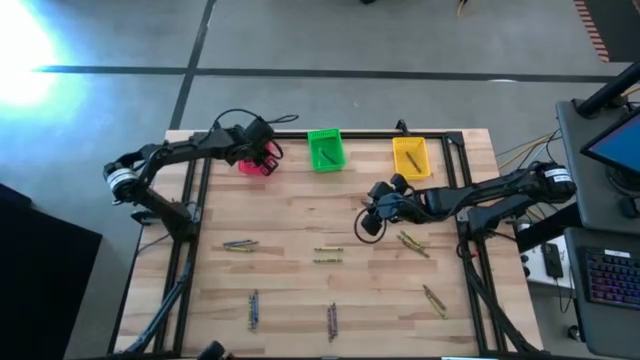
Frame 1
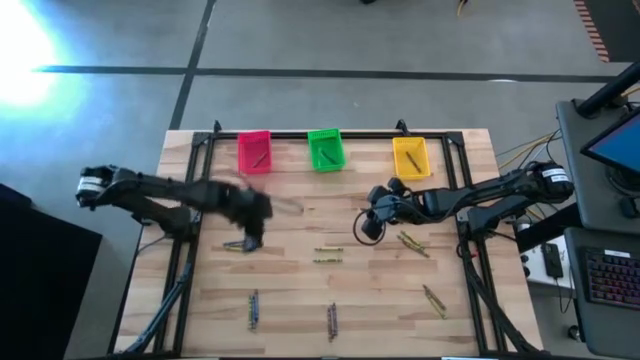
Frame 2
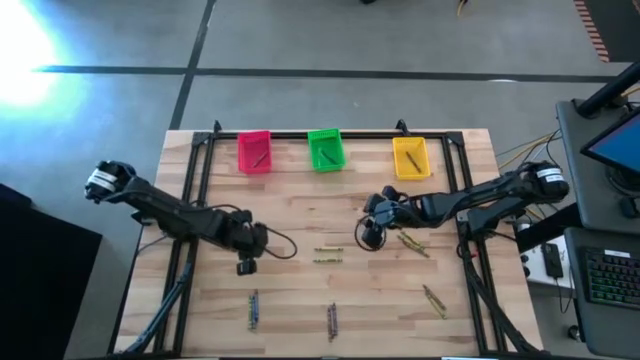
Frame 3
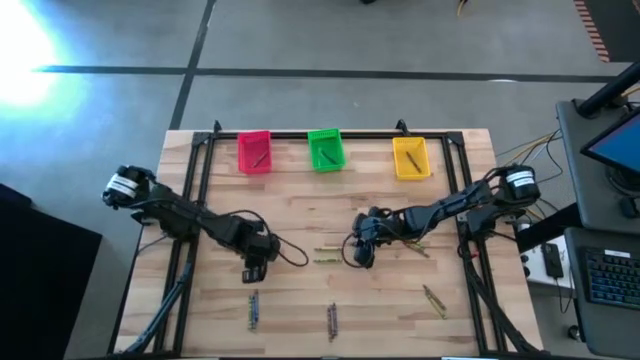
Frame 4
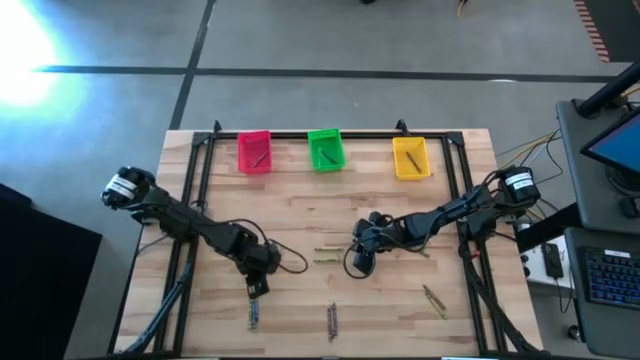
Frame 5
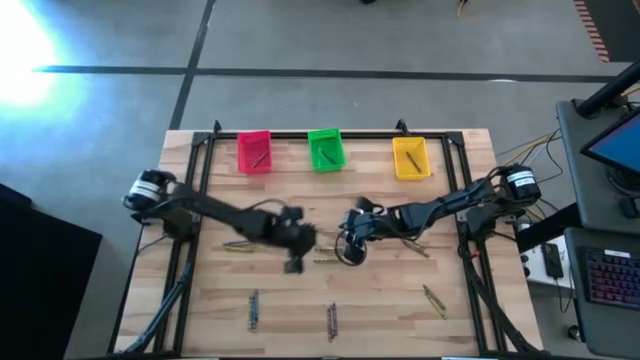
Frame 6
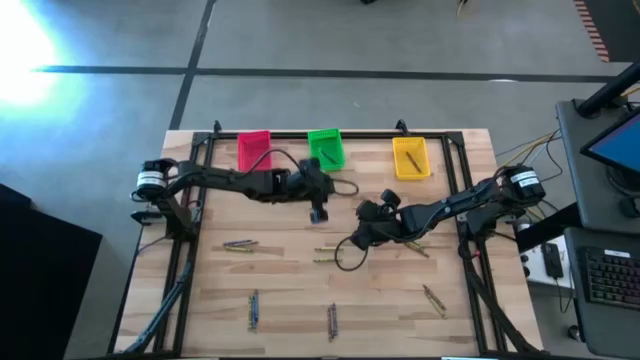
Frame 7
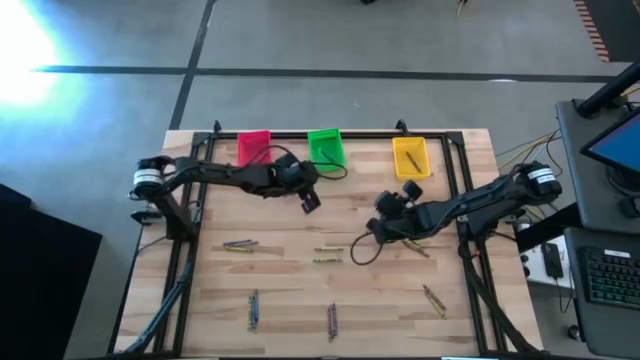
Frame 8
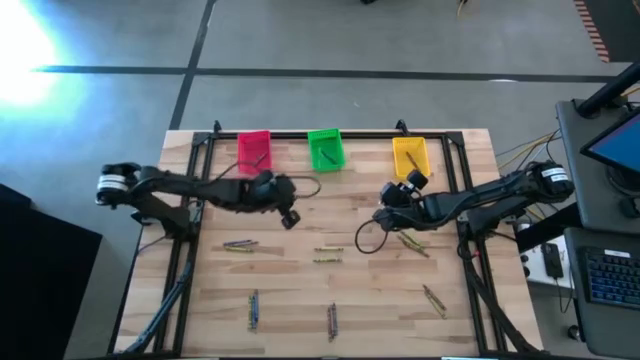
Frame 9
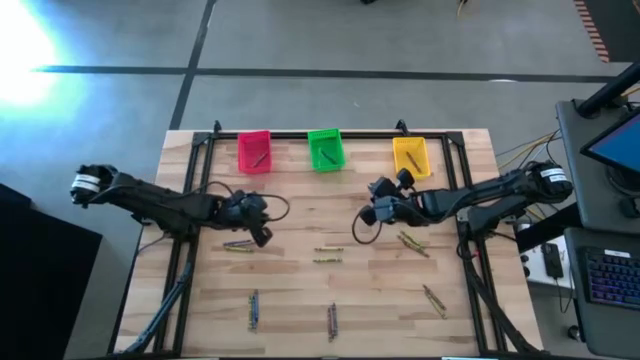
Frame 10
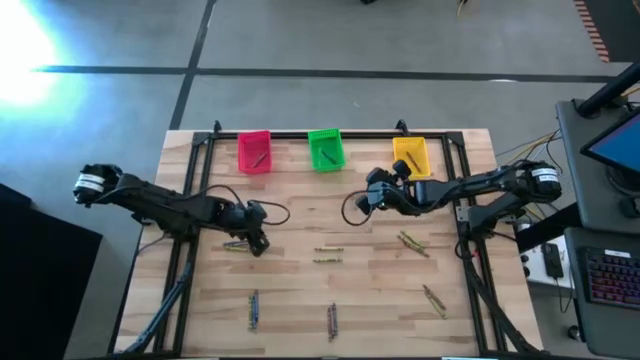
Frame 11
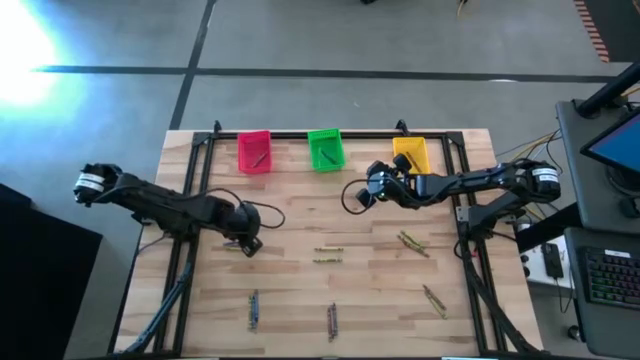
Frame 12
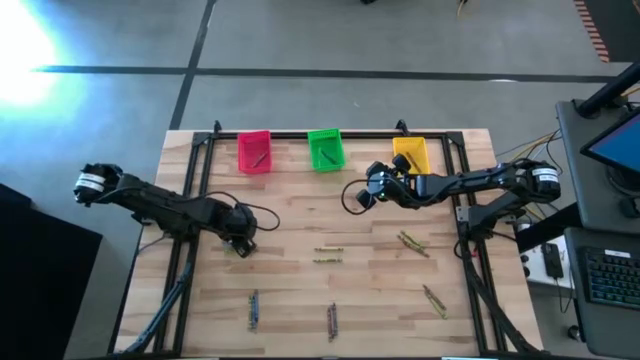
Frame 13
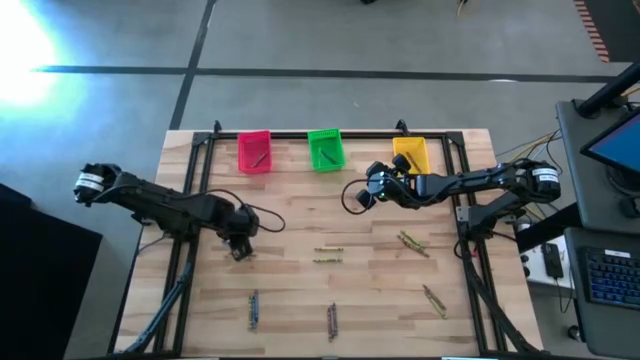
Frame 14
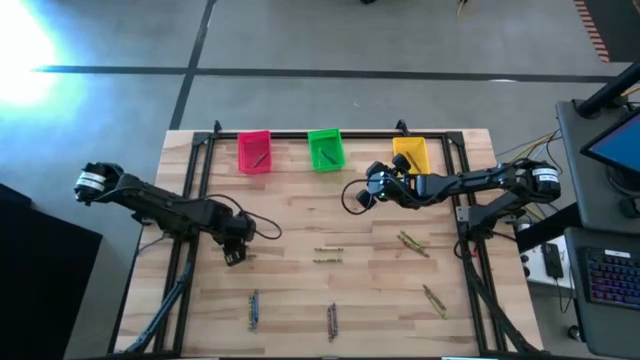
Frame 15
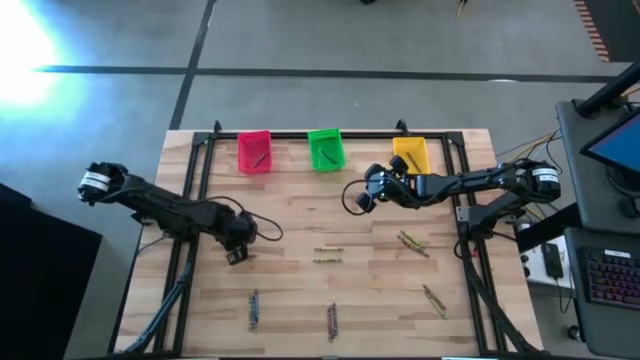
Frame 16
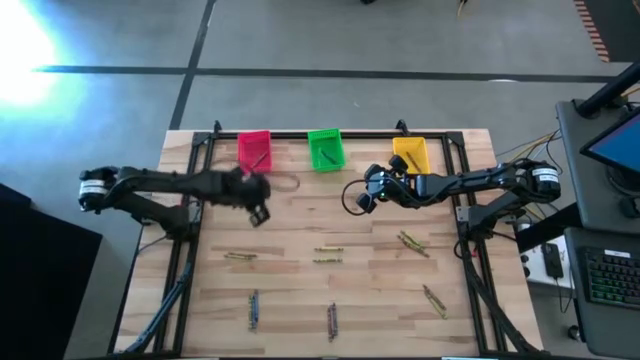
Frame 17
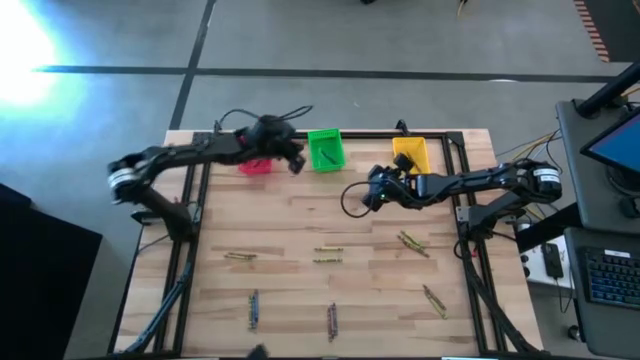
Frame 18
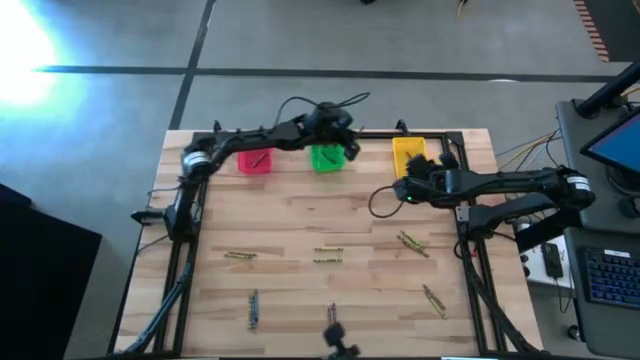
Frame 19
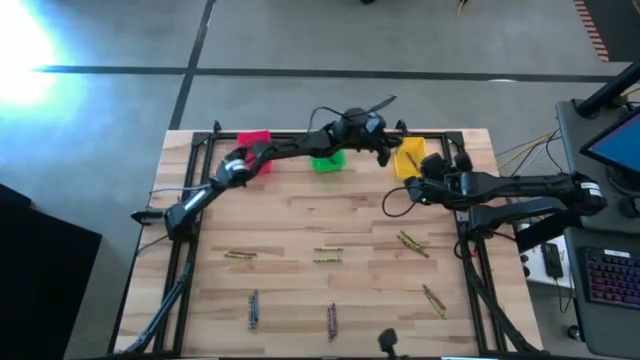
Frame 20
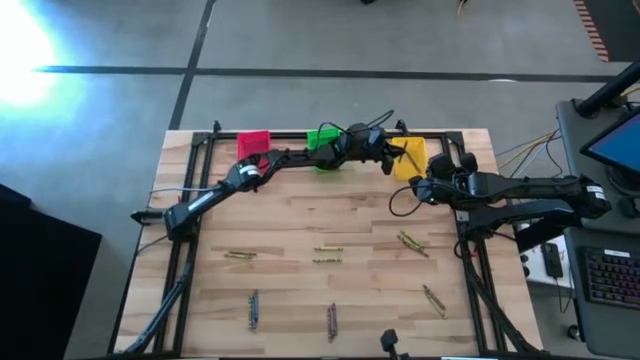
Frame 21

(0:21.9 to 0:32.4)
Task: Sort crayons
Put the blue crayon into the yellow basket

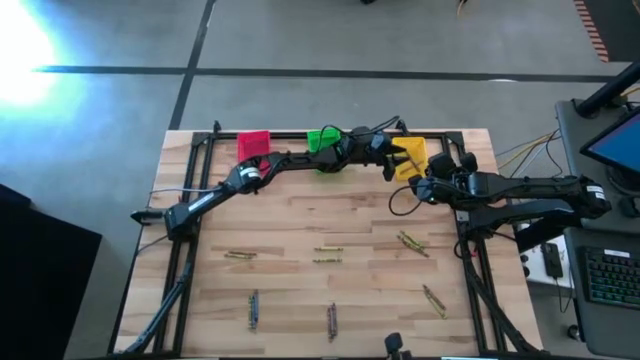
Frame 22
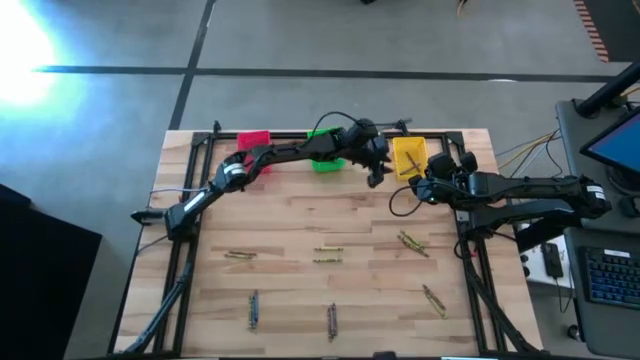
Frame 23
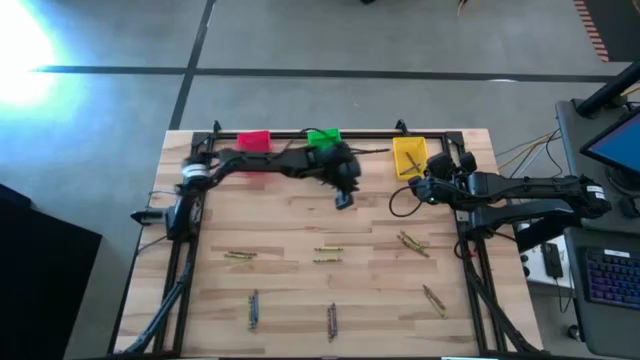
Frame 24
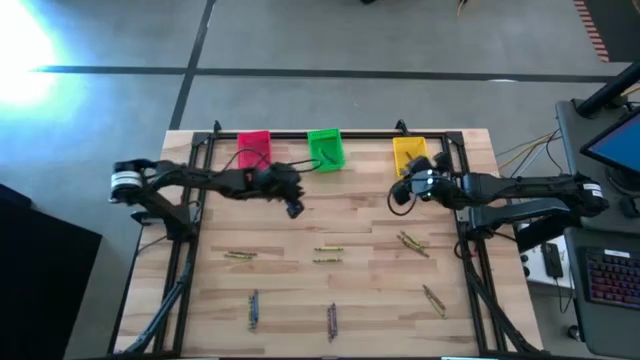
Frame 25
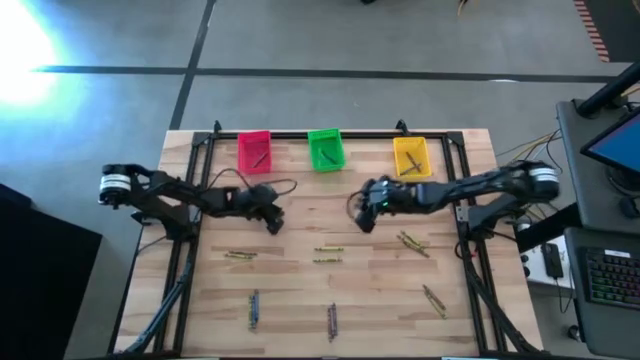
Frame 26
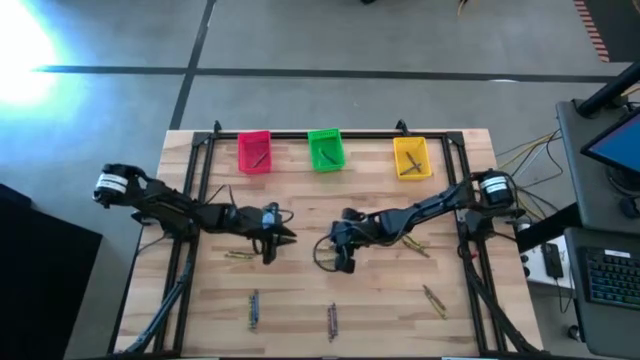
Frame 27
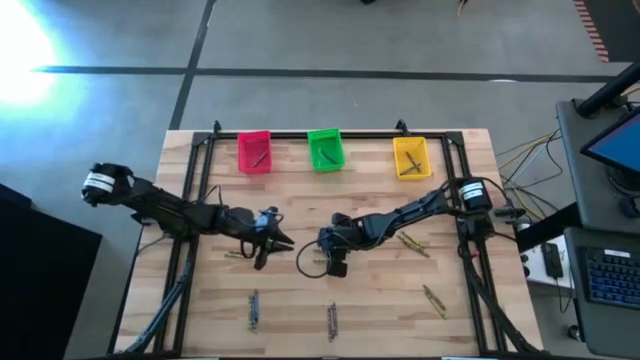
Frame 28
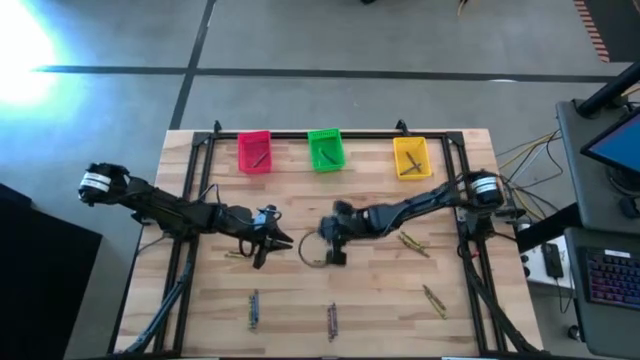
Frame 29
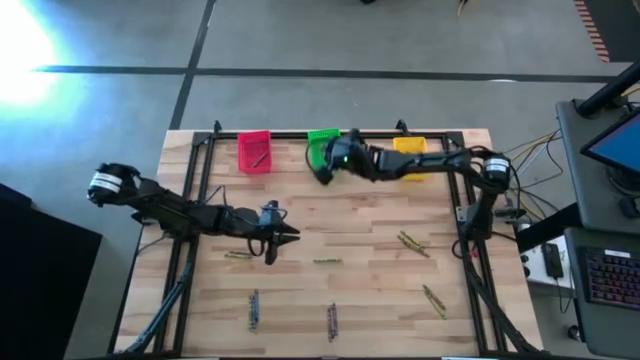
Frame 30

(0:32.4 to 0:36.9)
Put the green crayon into the green basket

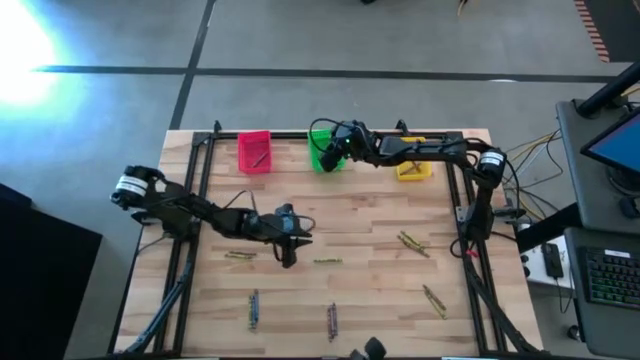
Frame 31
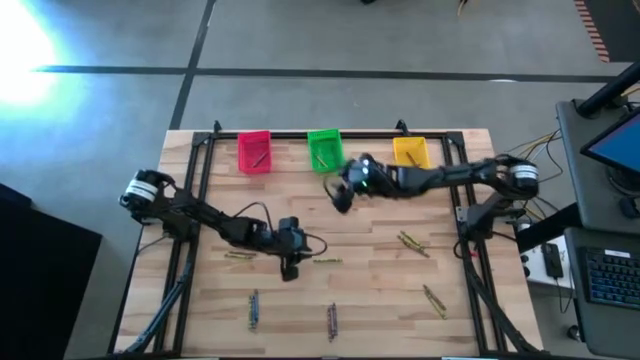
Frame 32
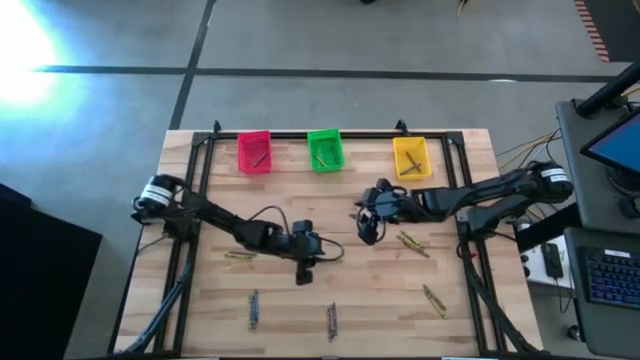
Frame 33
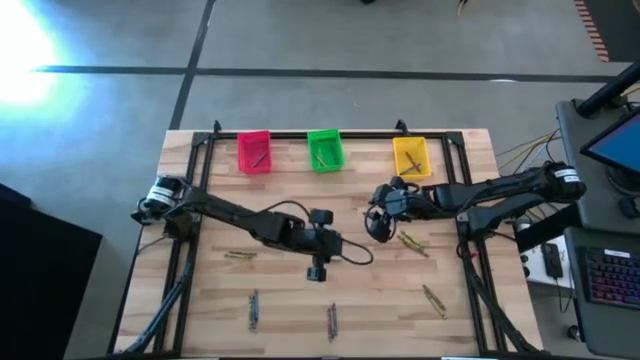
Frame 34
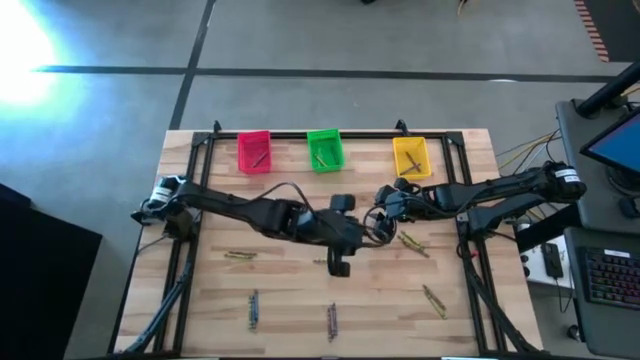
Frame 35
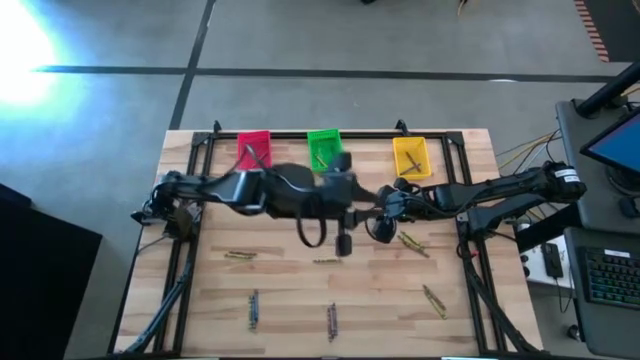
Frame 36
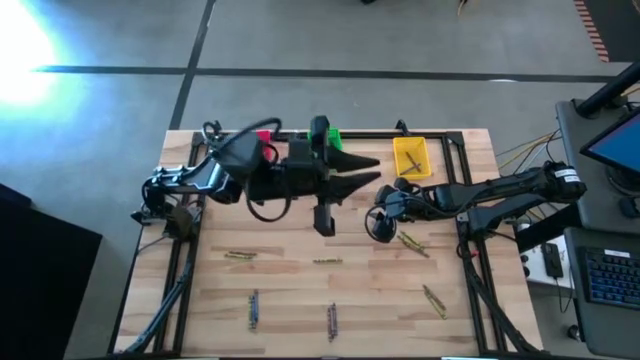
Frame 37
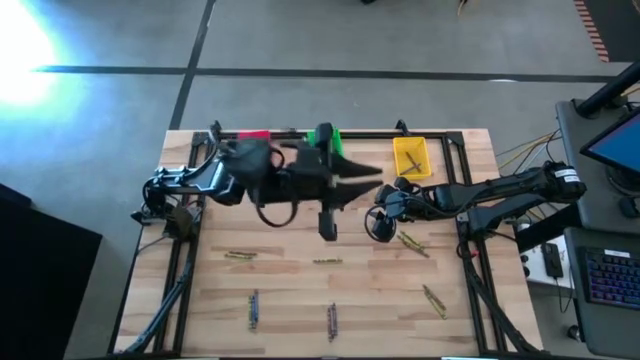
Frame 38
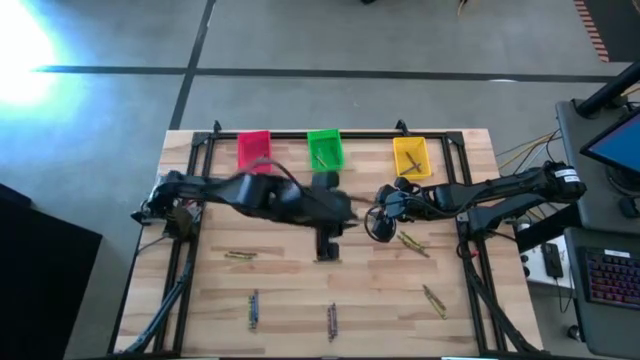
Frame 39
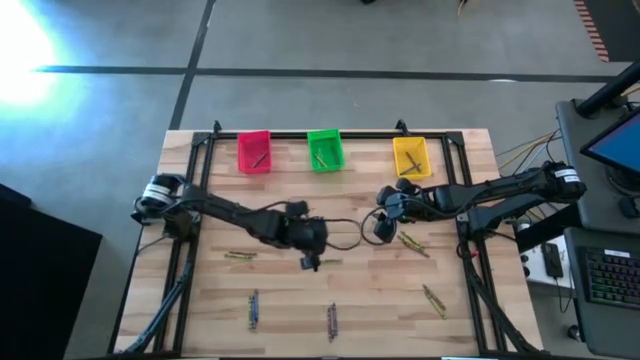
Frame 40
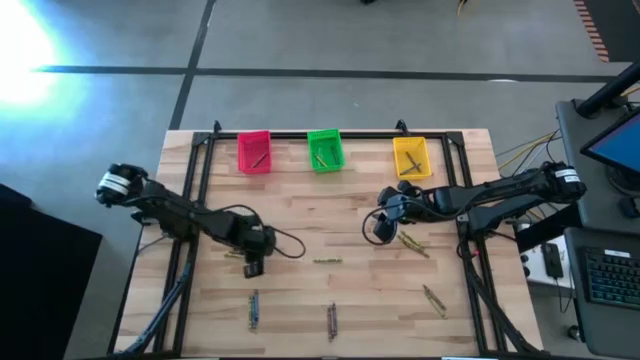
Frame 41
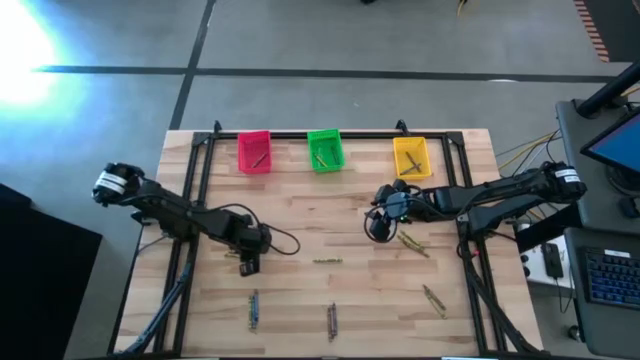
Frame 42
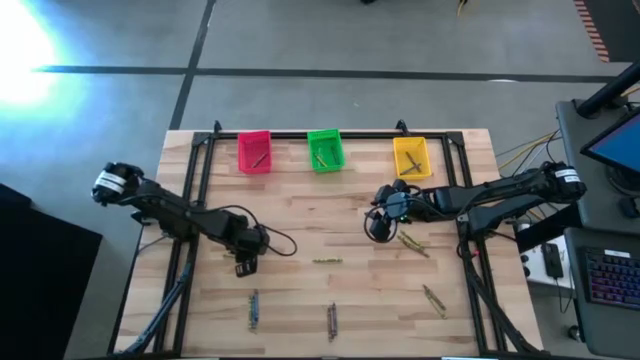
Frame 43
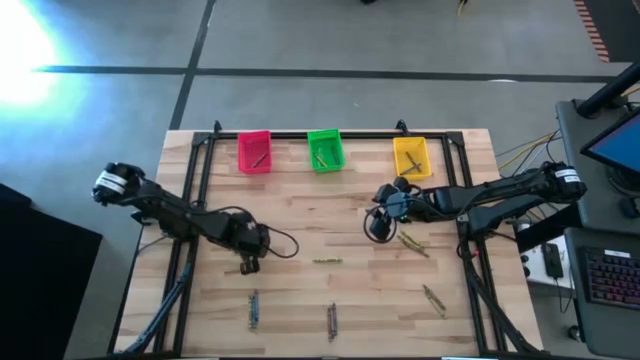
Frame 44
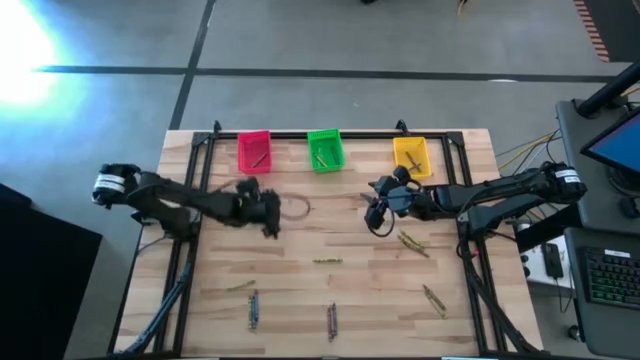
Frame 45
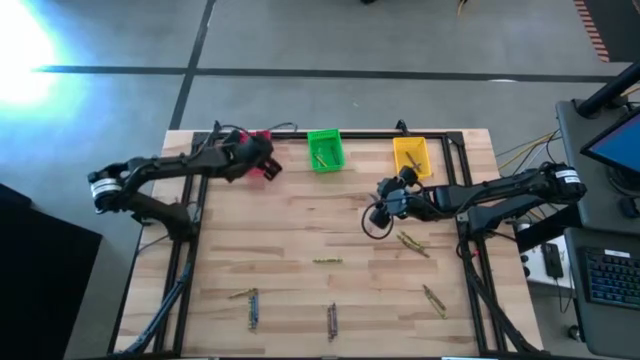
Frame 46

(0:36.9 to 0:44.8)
Put the brown crayon into the red basket
